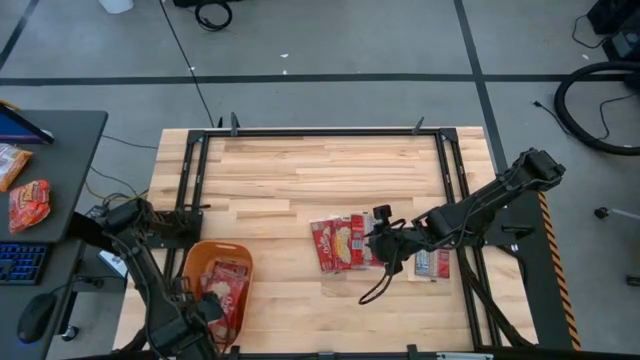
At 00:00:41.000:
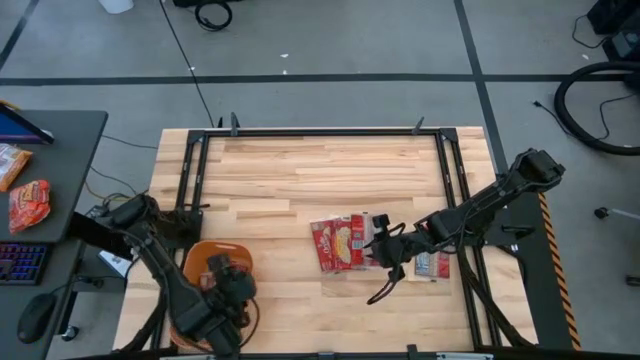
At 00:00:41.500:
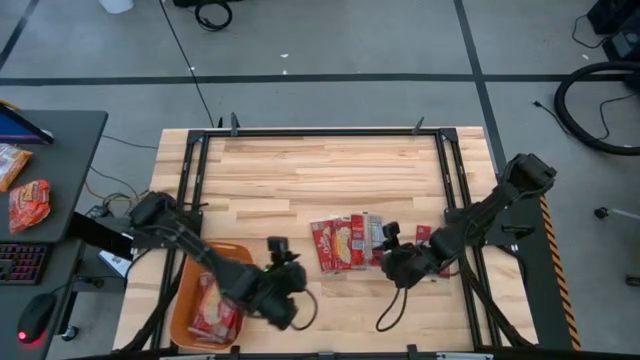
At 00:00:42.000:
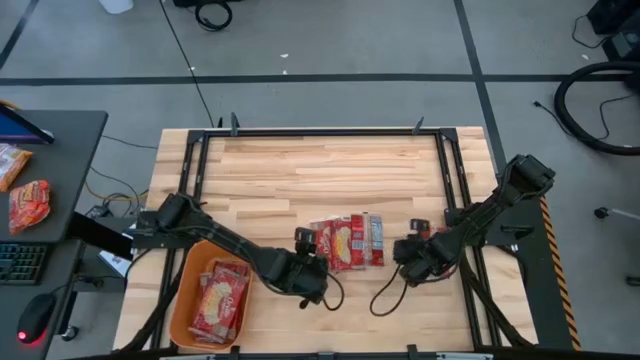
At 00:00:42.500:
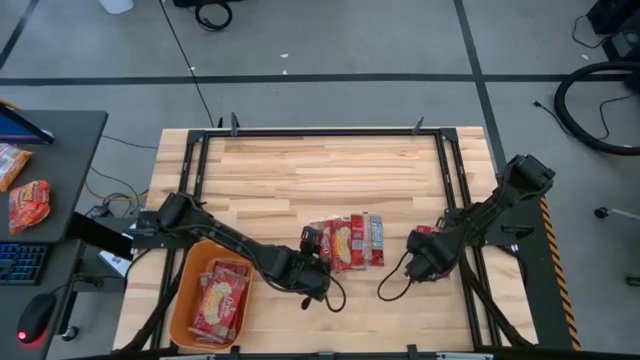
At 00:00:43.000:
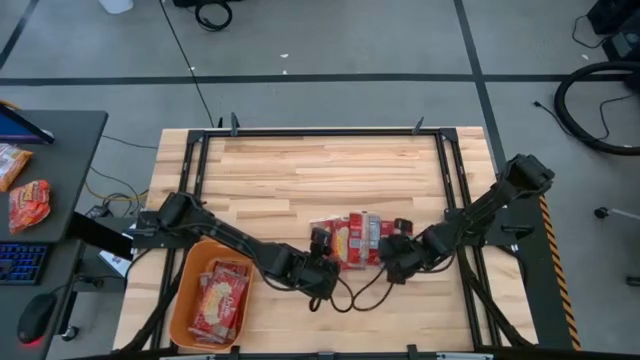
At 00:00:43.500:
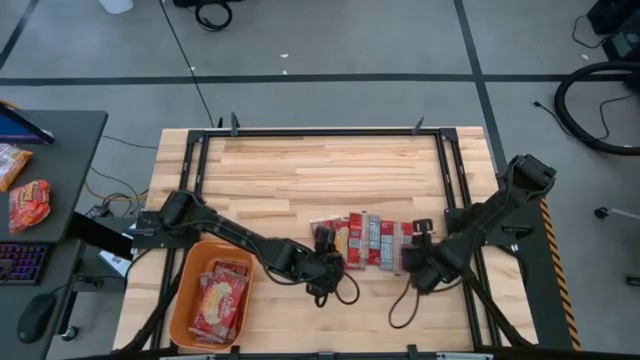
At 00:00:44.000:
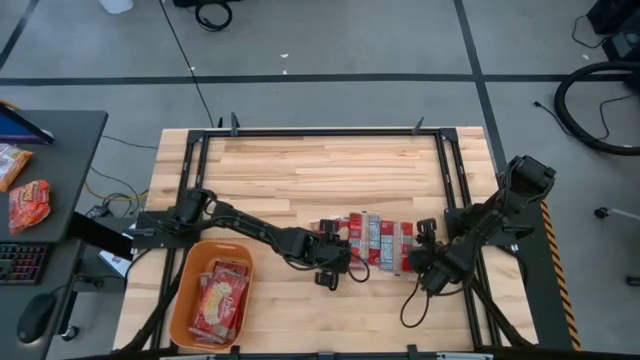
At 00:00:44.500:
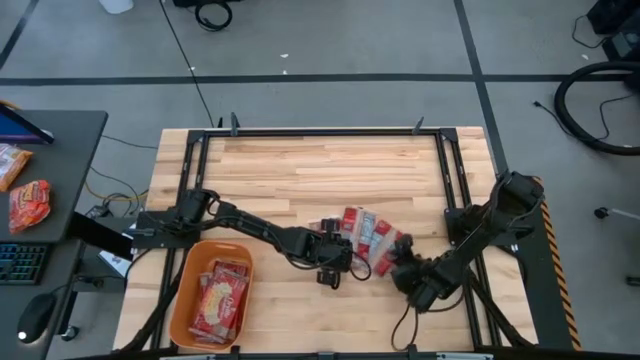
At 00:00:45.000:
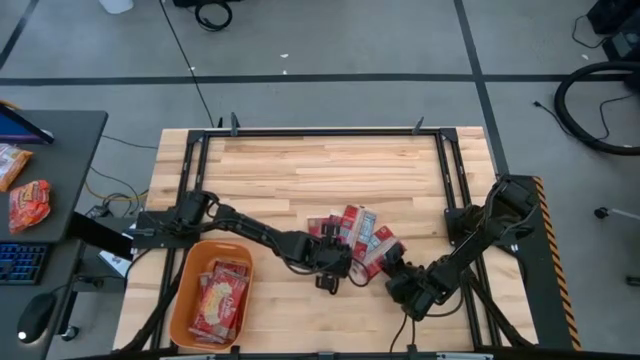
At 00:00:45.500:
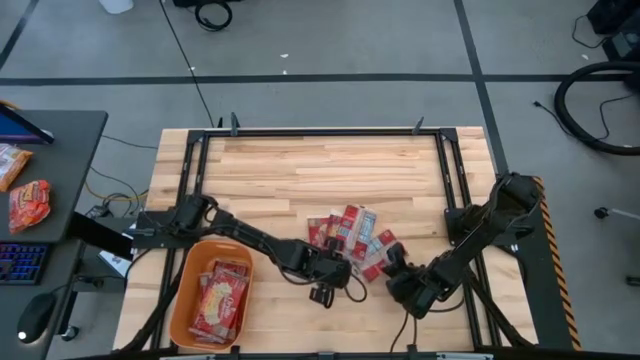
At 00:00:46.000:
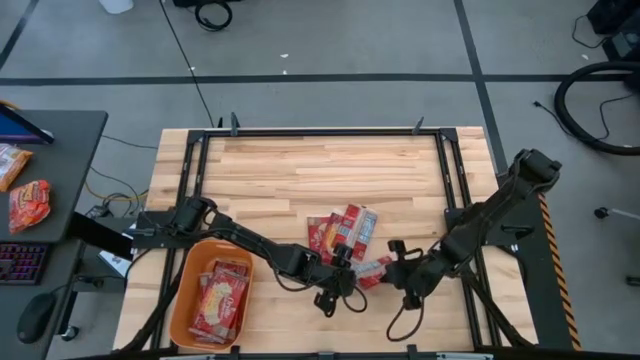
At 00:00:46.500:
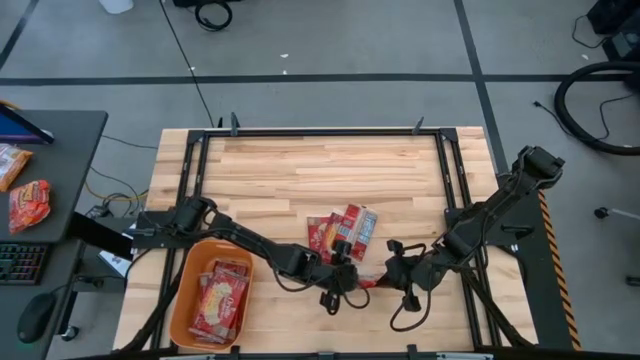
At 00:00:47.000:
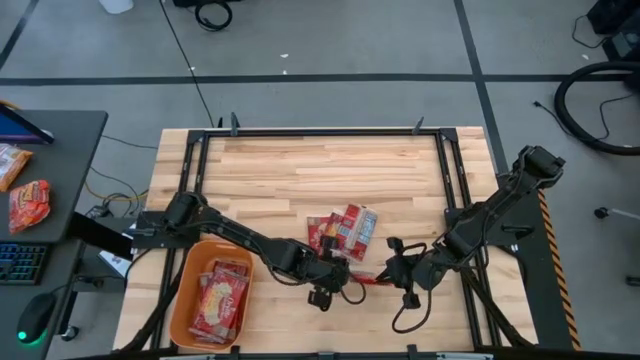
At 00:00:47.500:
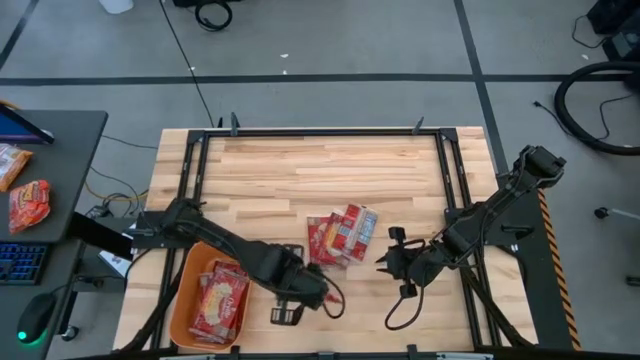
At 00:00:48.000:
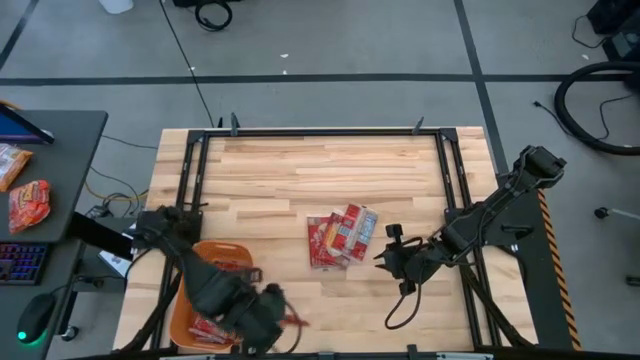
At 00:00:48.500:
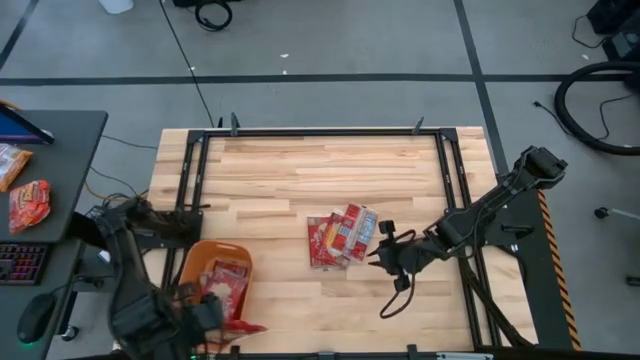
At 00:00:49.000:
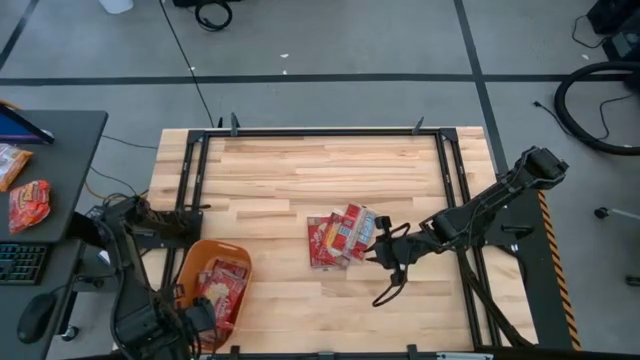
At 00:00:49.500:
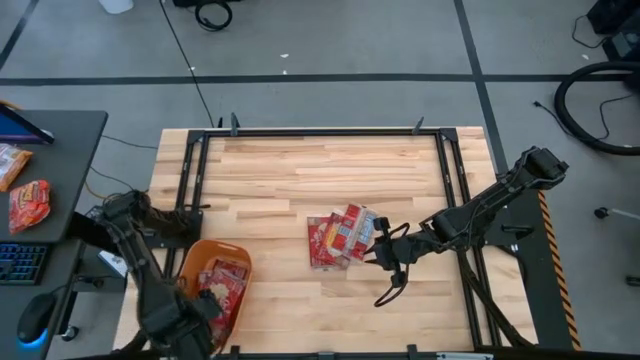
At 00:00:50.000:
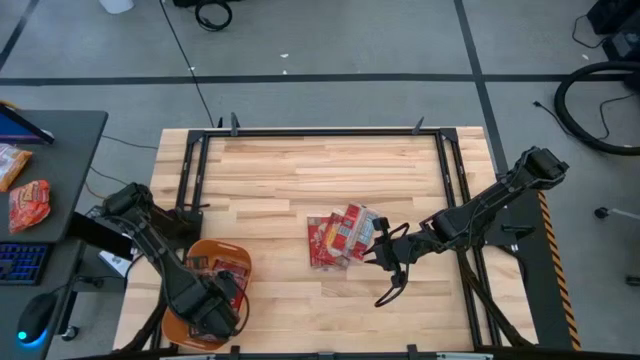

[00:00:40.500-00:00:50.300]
Task: Sort popcorn bags into baskets
Put the popcorn bag into the orange bin

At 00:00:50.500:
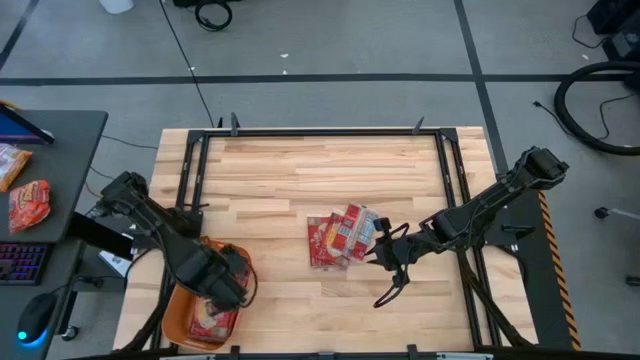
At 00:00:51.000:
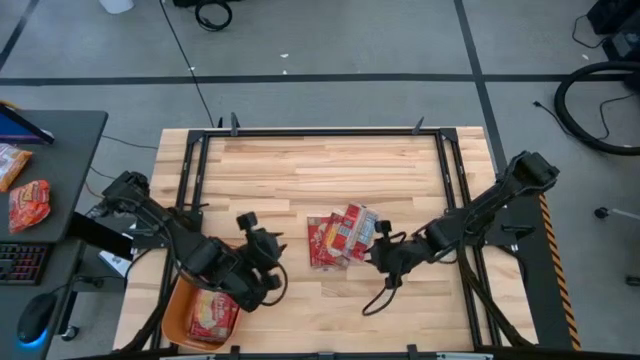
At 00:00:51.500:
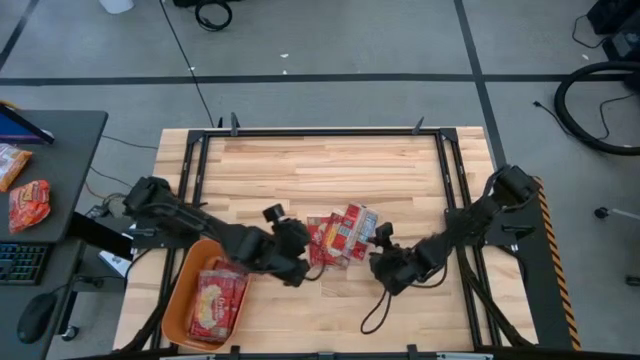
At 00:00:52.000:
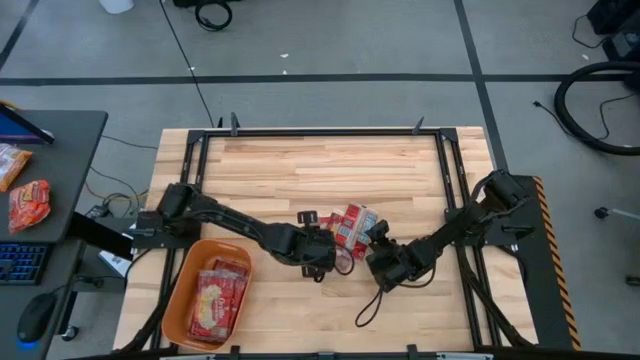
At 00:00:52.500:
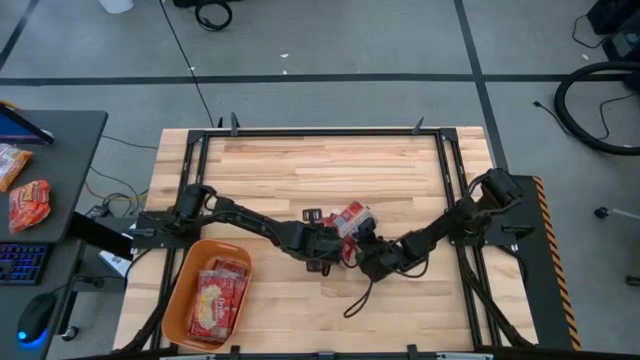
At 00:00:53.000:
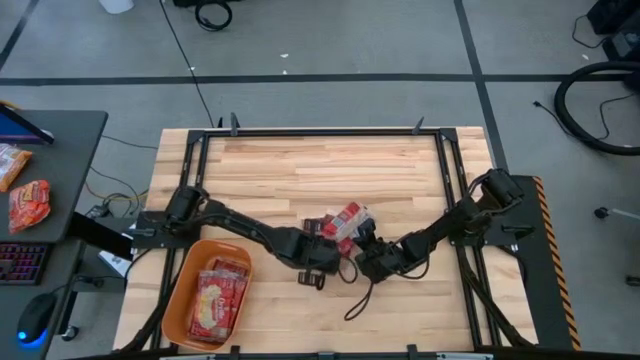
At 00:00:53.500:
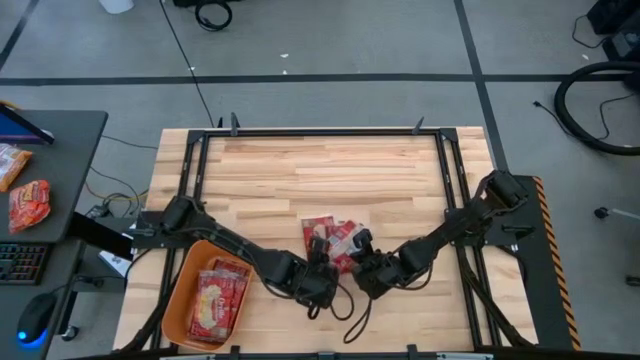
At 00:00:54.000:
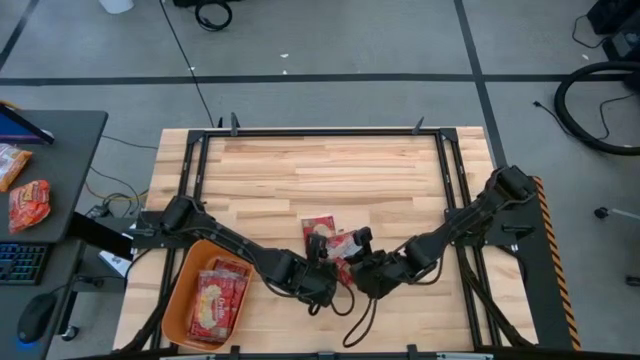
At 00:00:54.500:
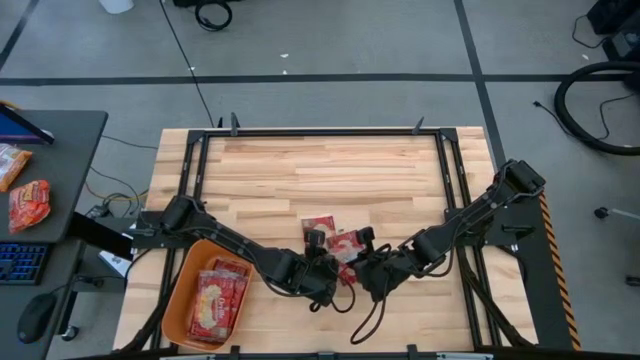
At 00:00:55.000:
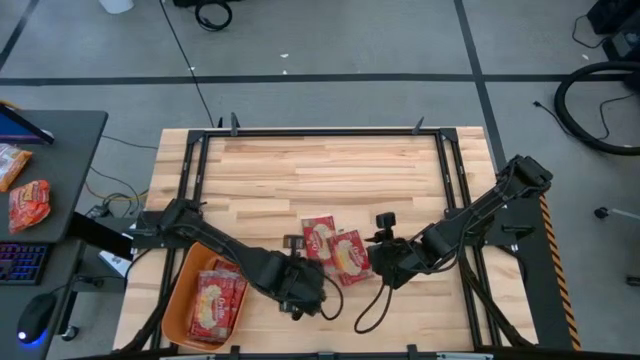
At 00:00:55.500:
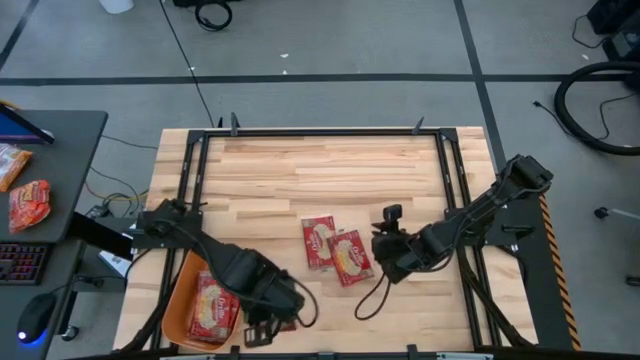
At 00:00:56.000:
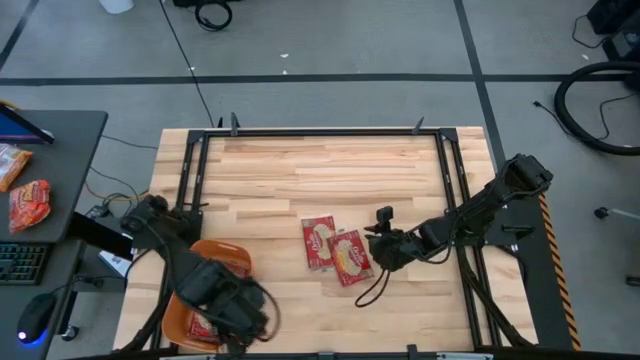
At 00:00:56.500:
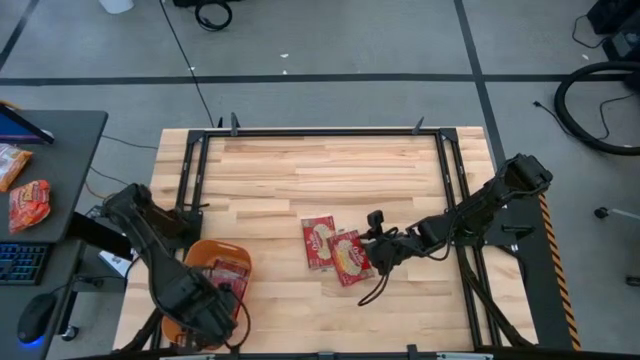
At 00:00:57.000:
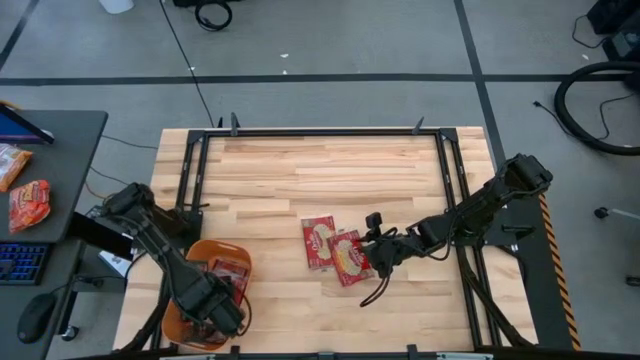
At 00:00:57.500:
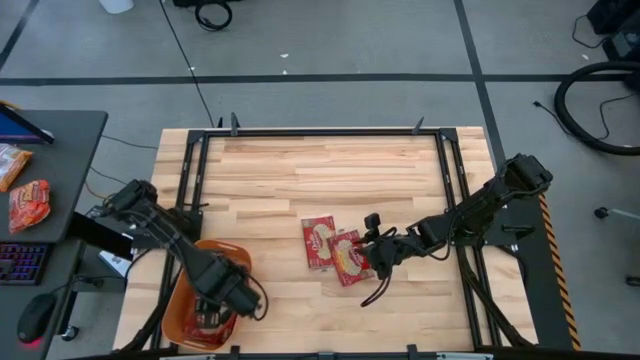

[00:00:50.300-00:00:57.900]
Put the right popcorn bag into the orange bin

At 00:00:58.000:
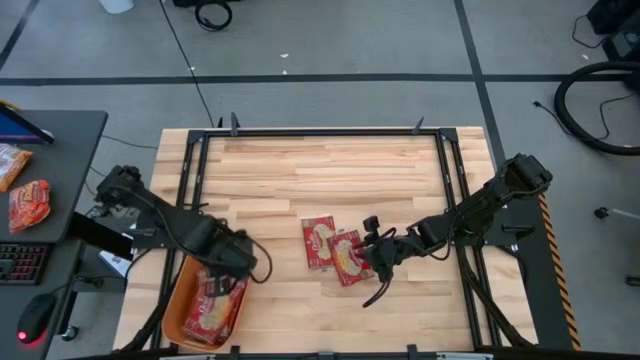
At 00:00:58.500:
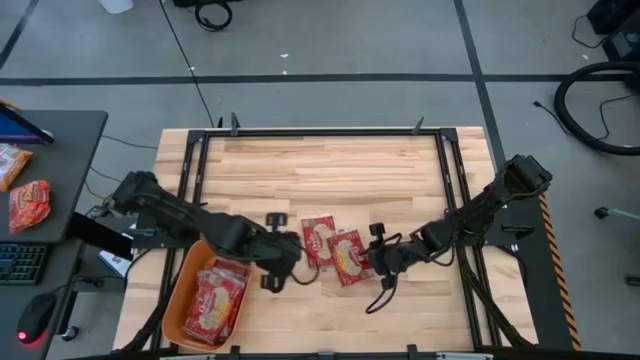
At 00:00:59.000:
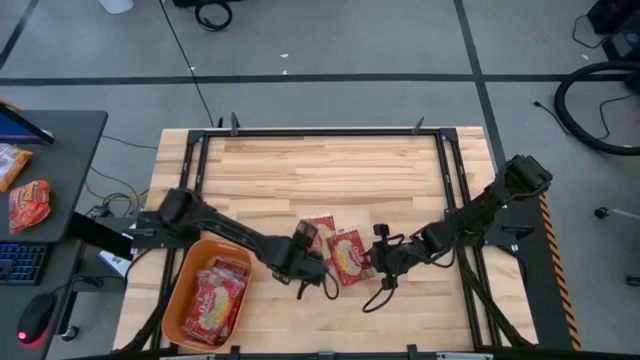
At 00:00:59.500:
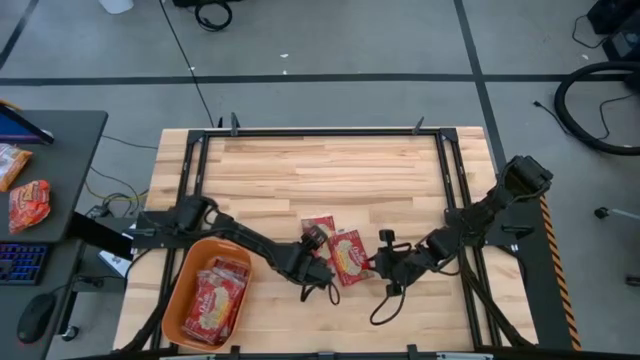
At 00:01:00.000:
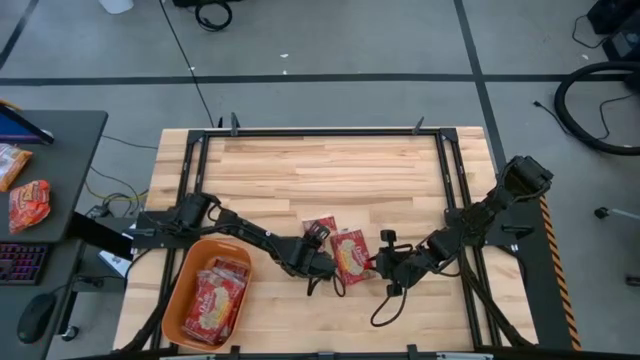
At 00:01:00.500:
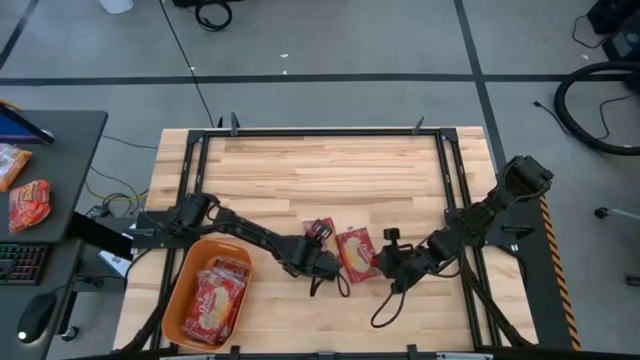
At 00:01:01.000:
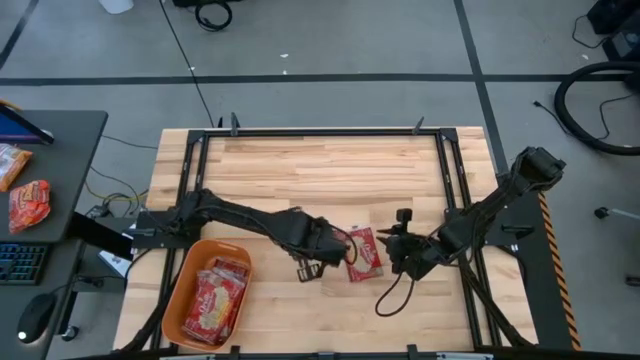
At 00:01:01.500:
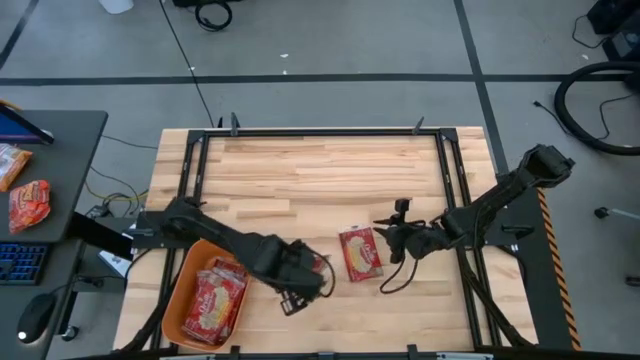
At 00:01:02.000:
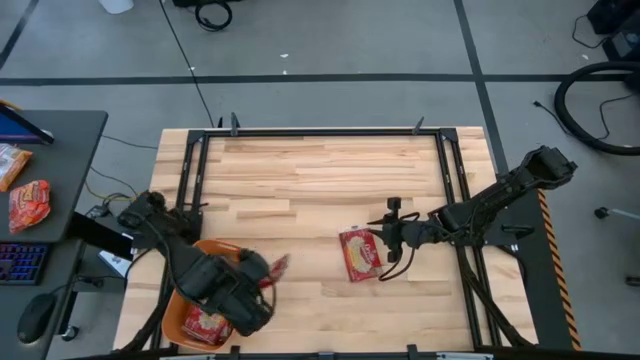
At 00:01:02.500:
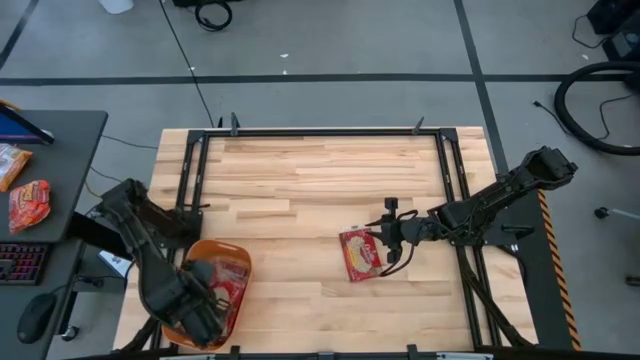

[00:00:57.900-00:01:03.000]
Put the left popcorn bag into the orange bin
